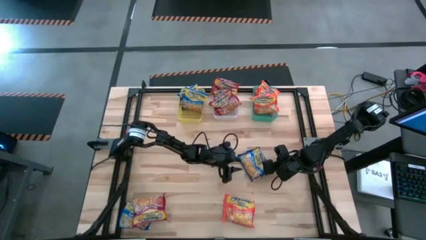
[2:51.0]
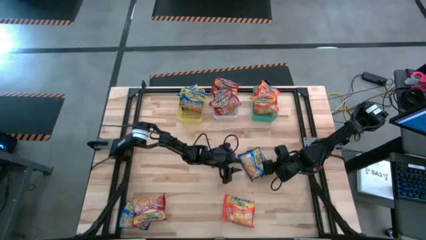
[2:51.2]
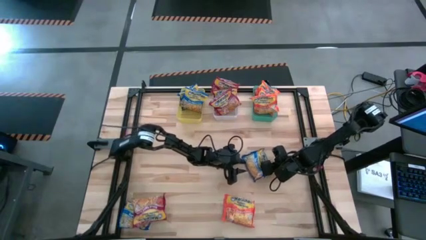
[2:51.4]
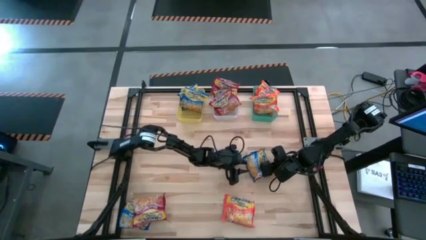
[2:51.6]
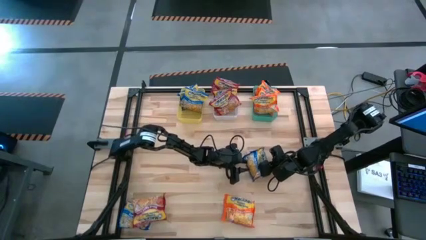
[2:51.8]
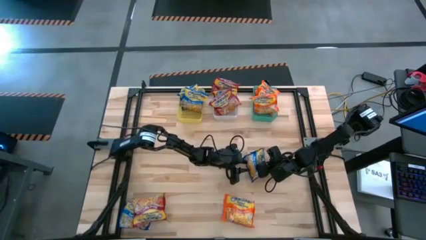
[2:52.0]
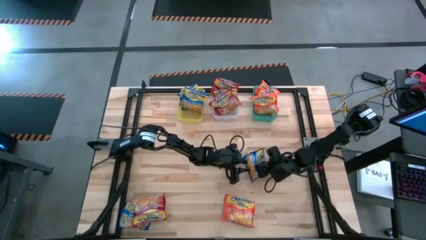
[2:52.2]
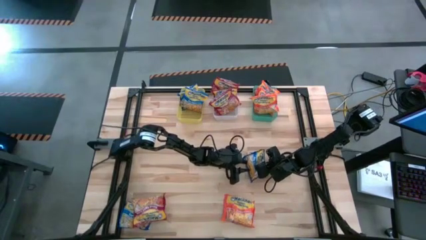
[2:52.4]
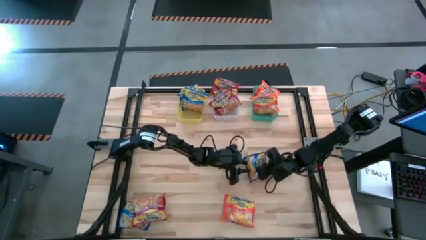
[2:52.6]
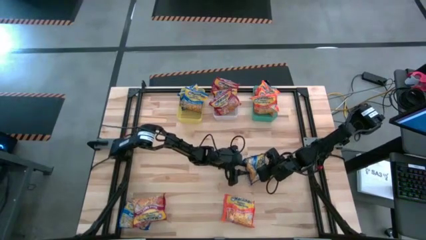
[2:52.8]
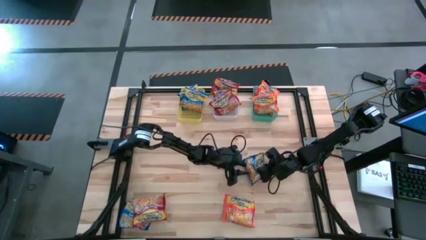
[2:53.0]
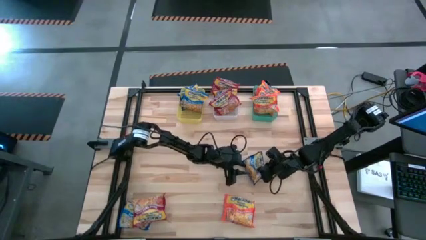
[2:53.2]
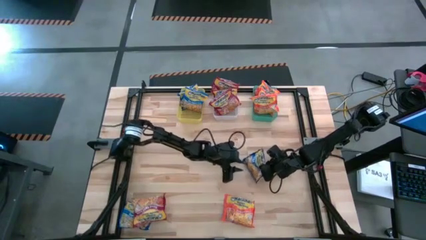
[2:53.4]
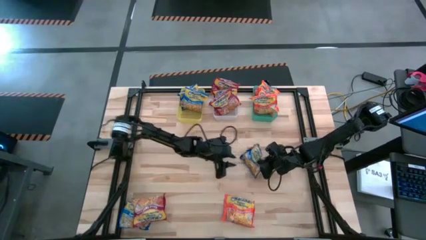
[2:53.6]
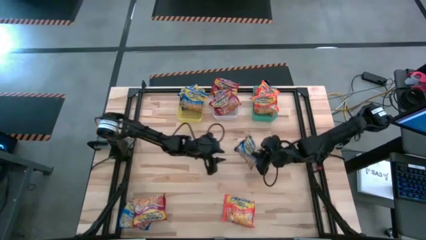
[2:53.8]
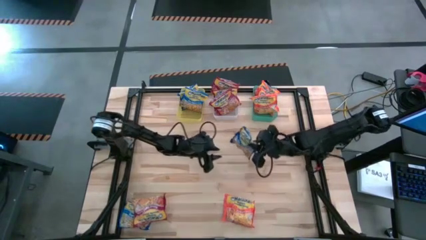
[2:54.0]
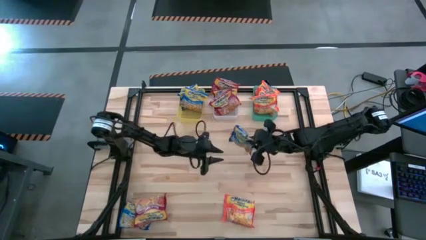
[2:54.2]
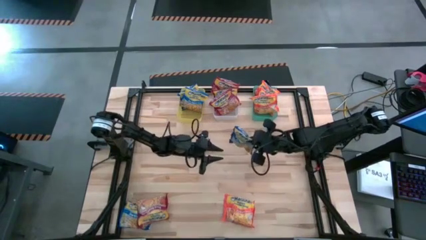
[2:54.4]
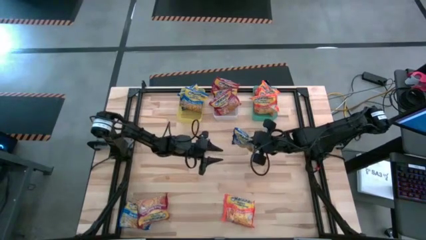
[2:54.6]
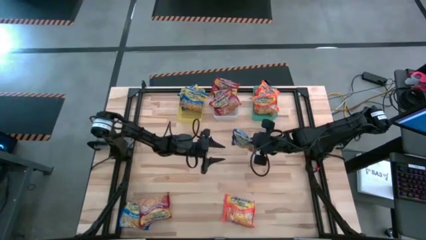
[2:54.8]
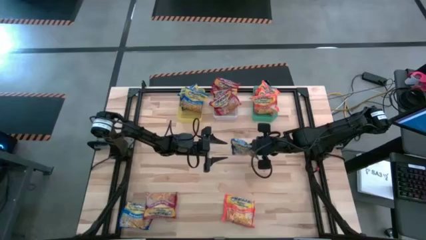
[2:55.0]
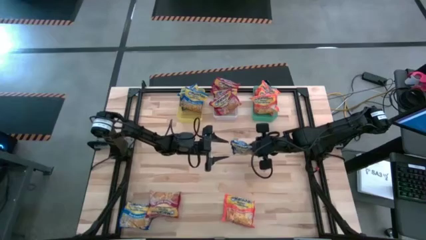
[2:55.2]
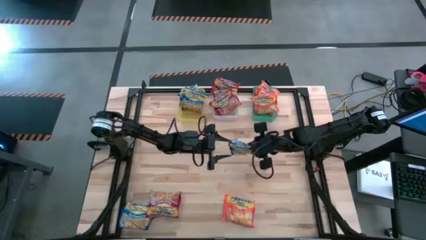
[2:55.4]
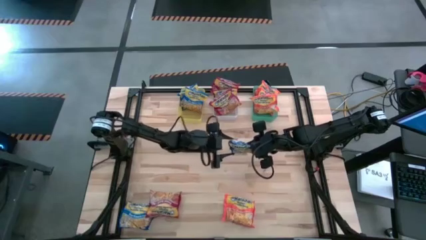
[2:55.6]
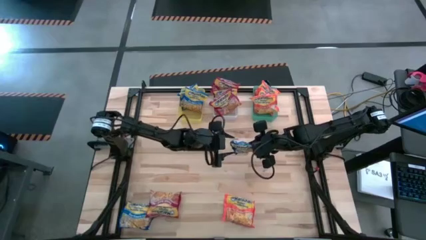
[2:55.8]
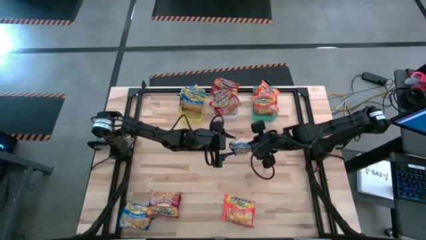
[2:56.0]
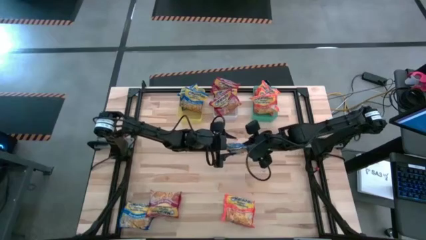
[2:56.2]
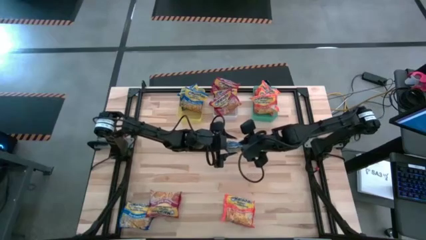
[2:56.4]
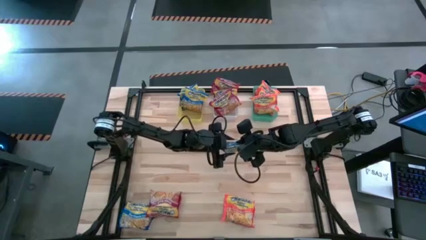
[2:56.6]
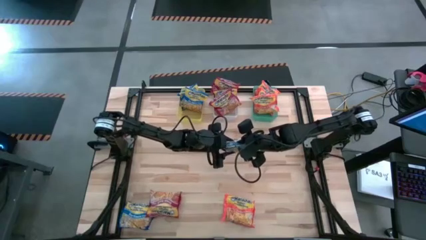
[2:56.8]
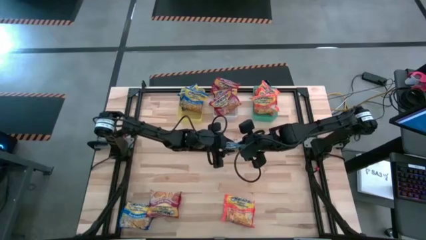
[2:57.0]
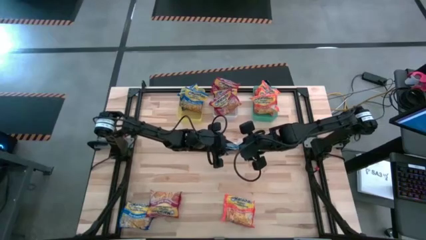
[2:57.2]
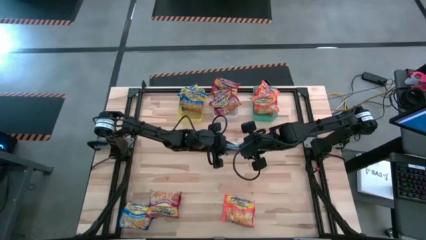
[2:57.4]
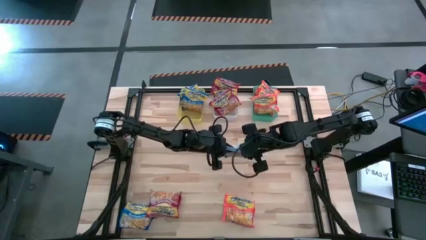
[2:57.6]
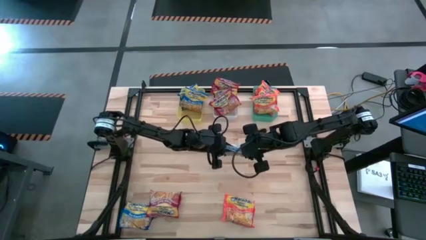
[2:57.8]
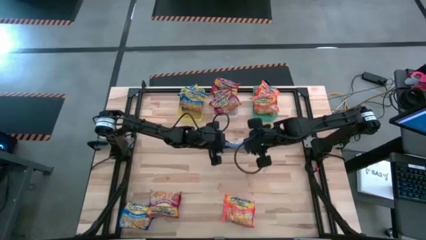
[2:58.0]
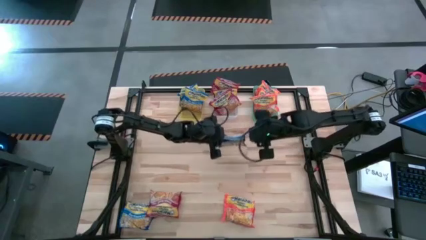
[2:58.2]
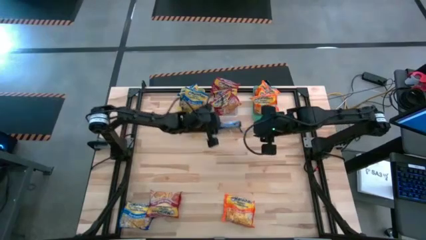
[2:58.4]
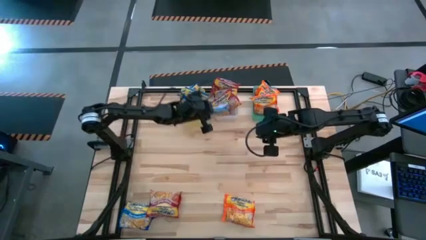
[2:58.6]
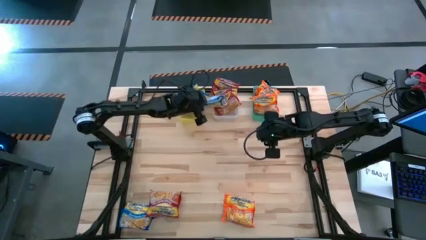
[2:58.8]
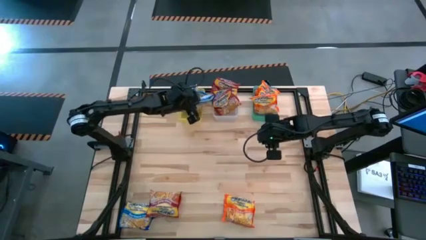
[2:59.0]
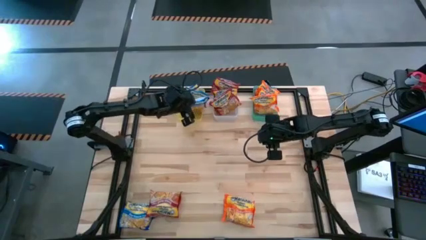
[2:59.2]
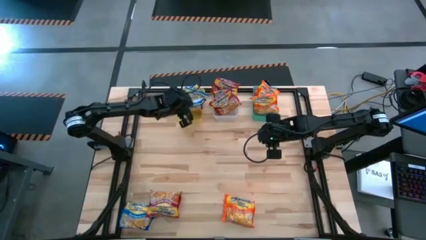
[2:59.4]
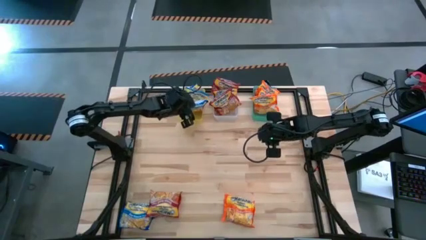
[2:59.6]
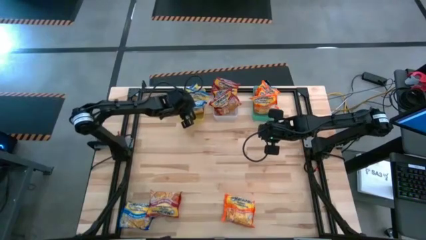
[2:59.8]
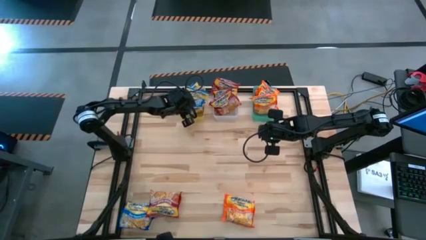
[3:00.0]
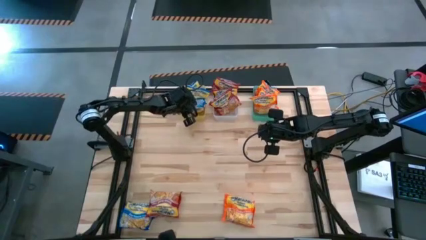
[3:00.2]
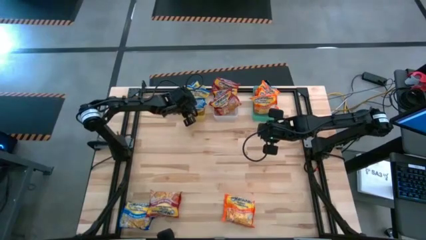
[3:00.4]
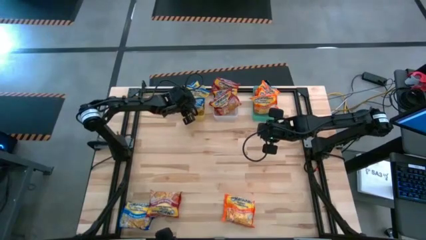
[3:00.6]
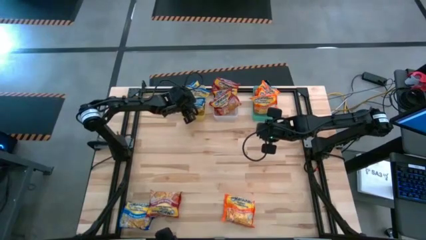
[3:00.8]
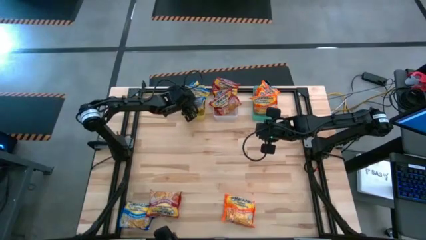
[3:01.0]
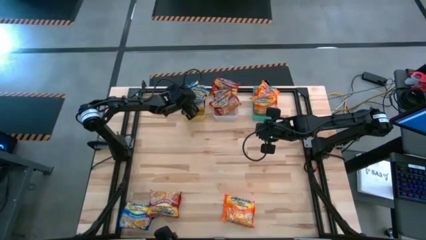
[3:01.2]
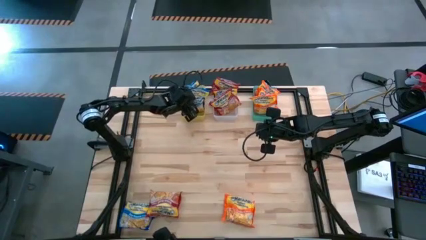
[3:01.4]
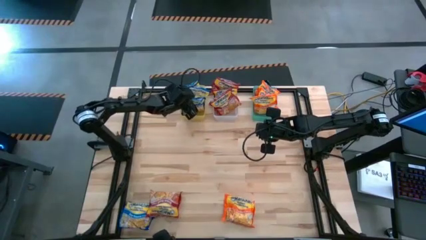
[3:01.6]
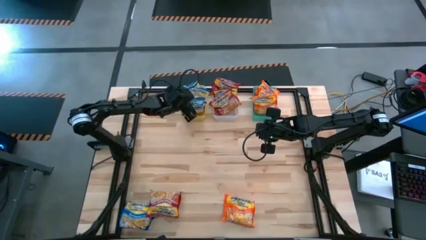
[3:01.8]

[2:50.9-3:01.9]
Task: Sort Maruchan noodles
Put the top blue noodle pack into the yellow bin

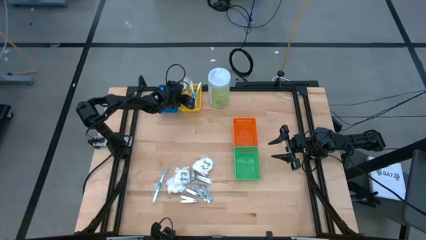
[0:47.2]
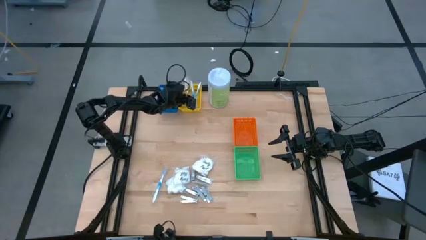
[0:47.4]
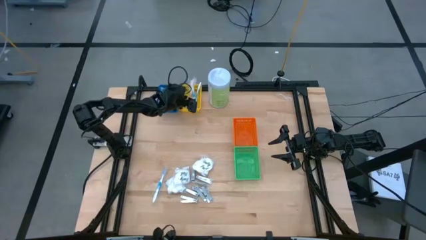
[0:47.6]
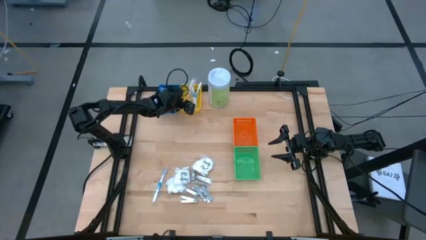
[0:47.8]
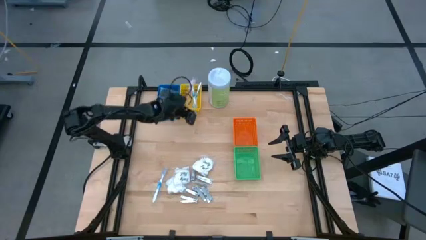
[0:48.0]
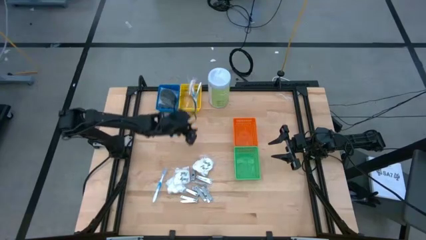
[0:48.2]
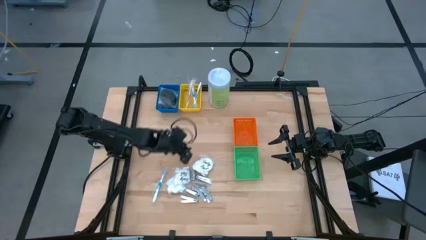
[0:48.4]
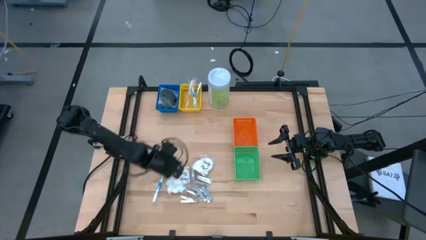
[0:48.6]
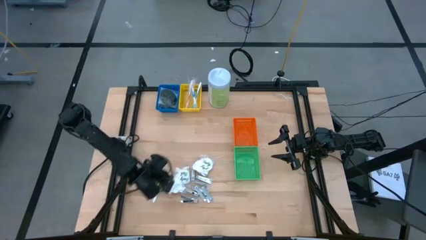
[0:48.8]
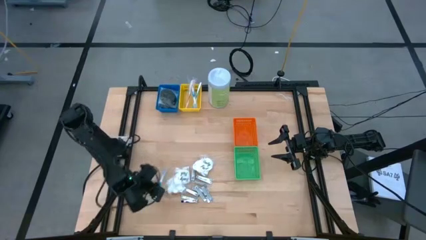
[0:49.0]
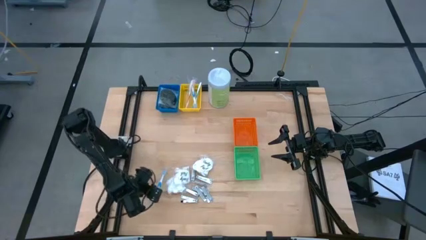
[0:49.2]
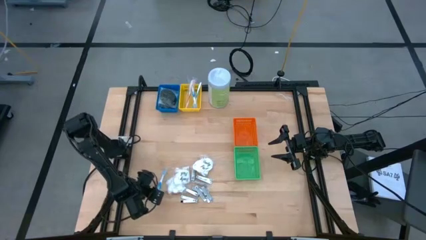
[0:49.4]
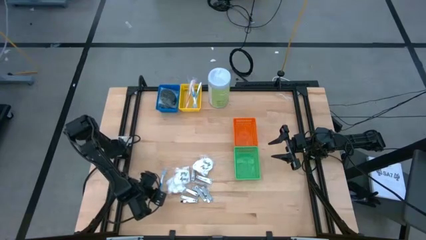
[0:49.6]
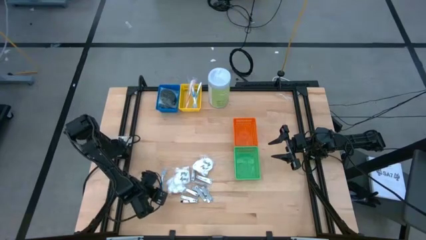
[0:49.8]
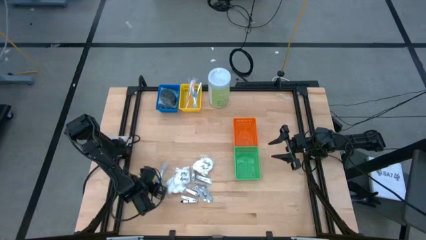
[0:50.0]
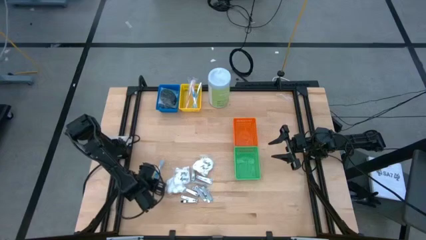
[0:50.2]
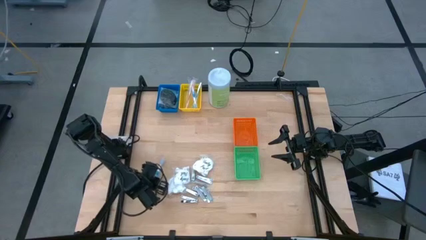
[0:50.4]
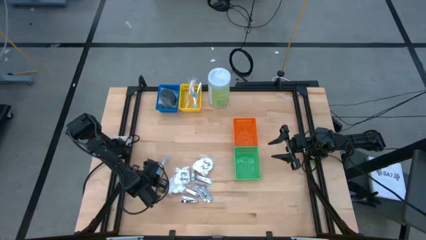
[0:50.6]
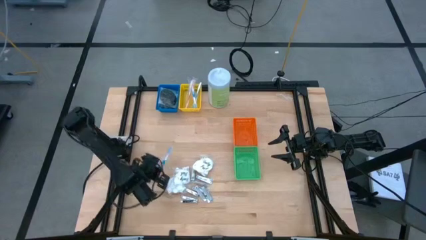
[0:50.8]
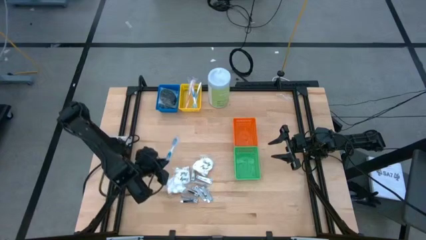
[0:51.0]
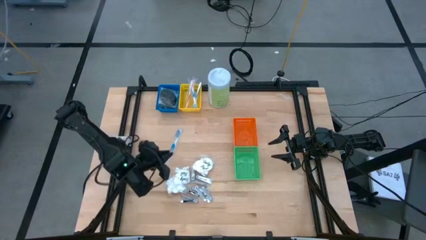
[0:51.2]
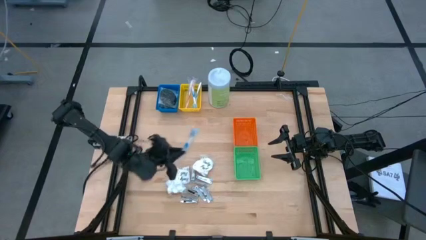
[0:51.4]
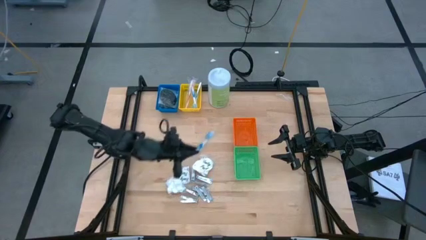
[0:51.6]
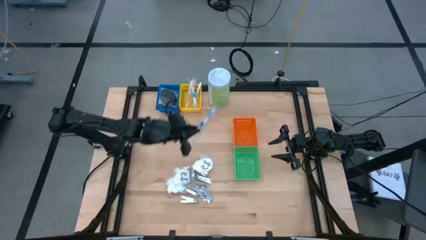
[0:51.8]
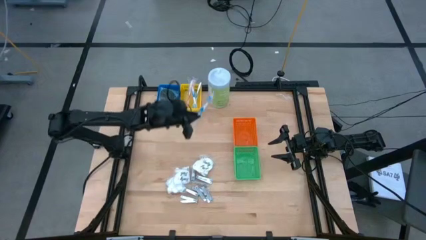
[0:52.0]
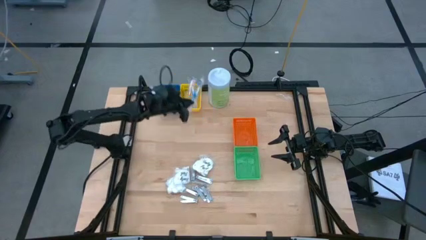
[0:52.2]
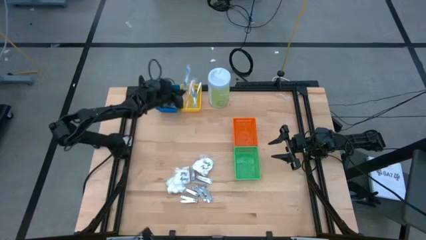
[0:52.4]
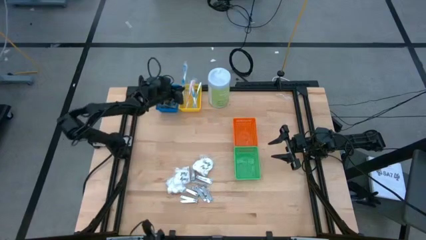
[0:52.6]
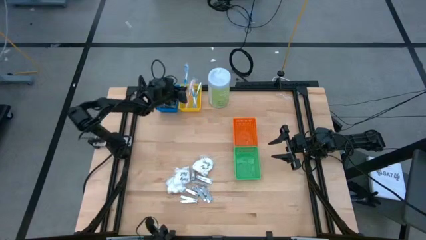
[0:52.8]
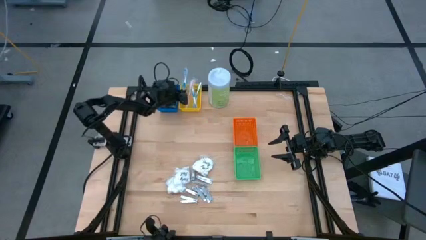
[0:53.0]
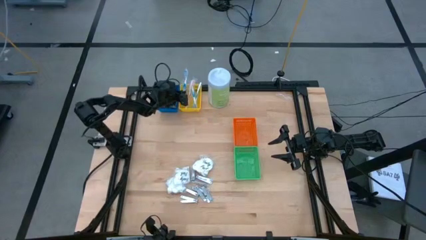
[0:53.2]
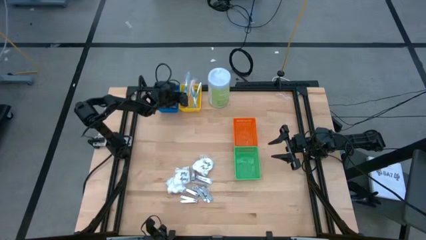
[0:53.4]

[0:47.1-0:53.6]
Task: Pick & Place Travel size toiletries
Put the blue toothbrush into the yellow bin
